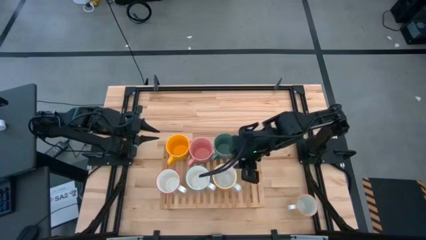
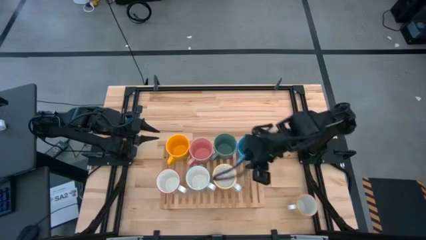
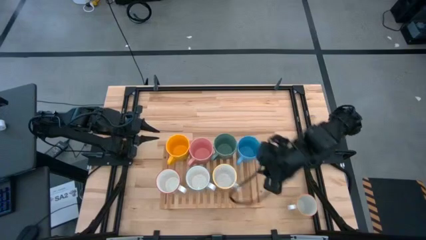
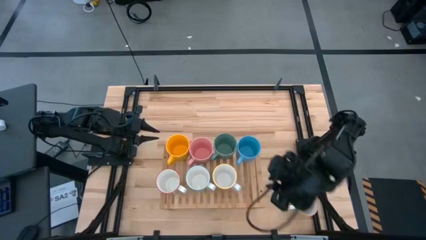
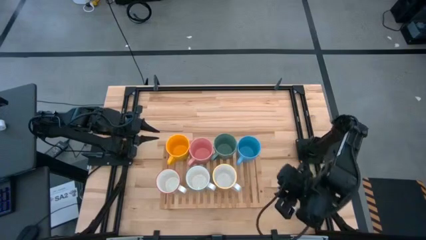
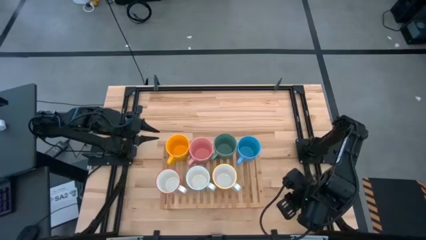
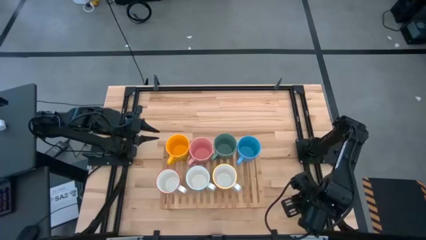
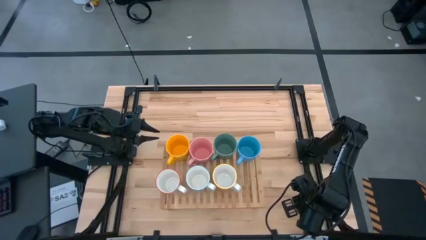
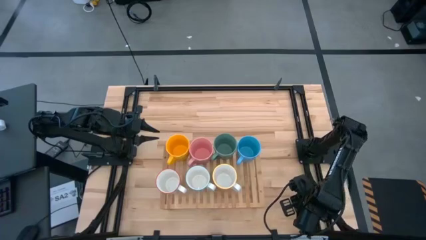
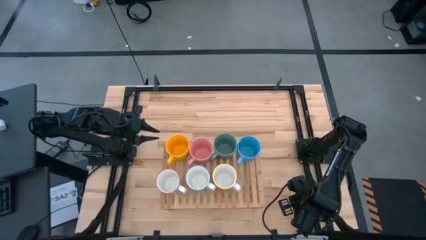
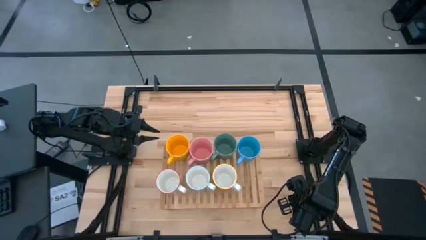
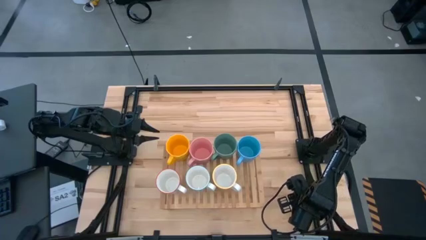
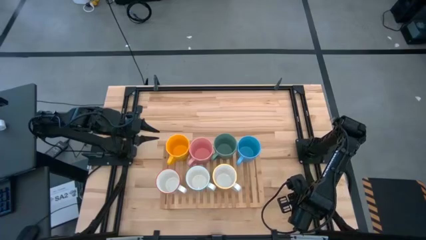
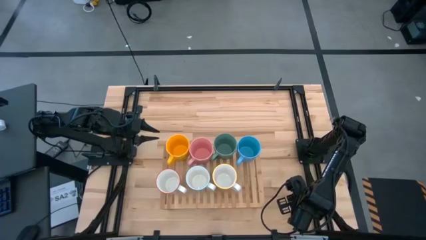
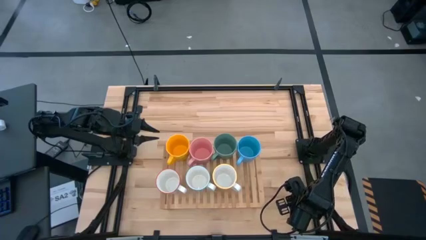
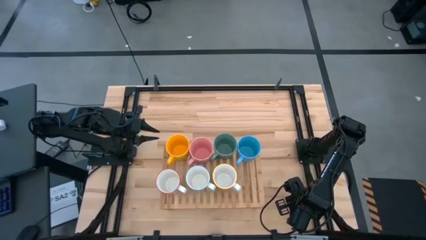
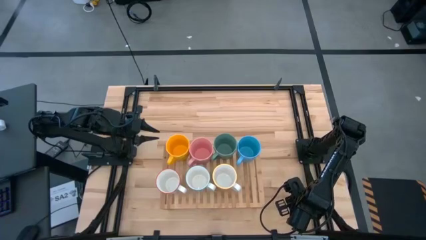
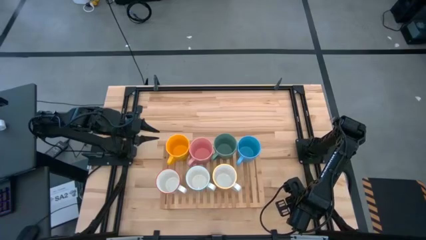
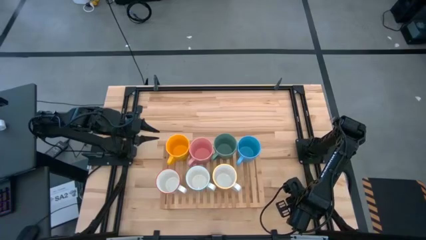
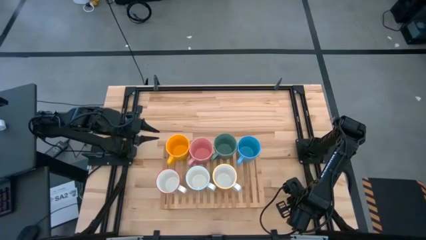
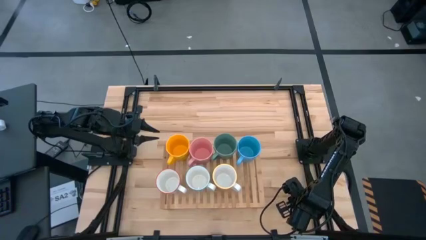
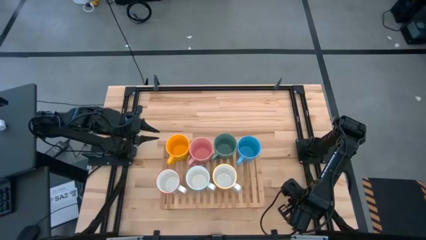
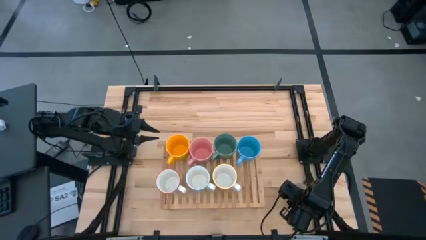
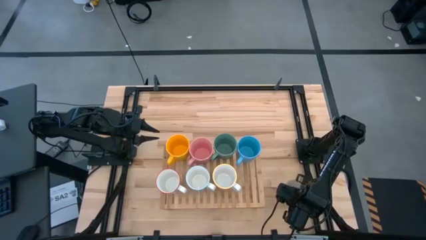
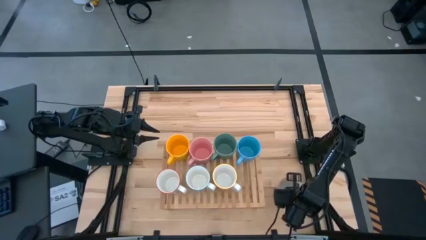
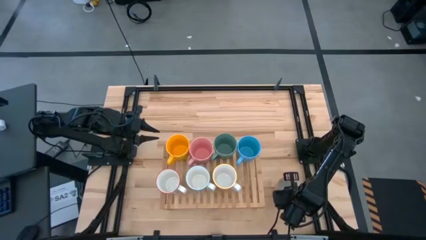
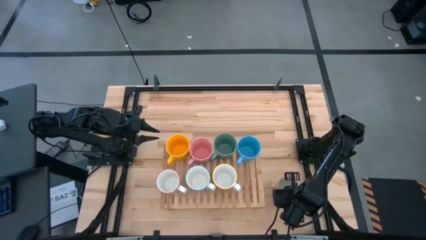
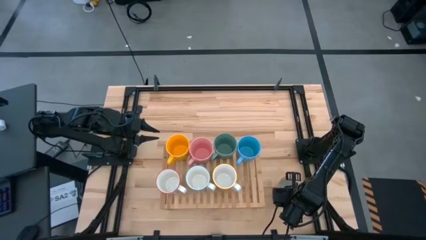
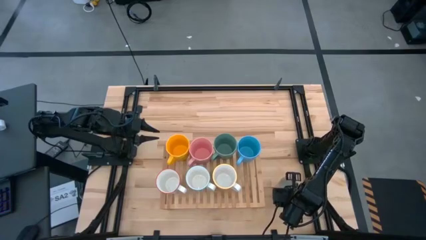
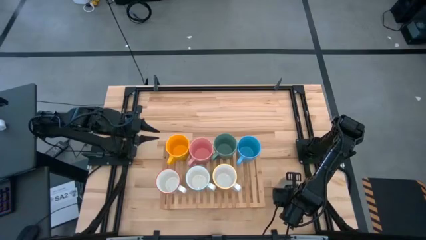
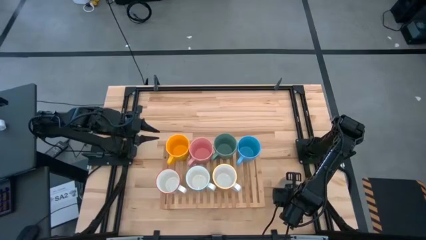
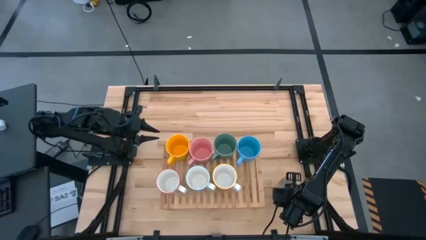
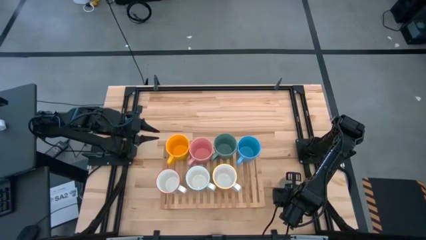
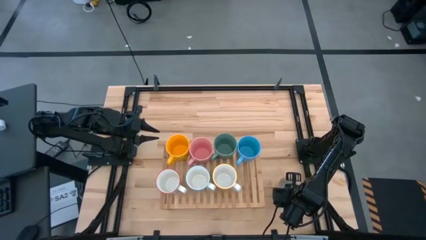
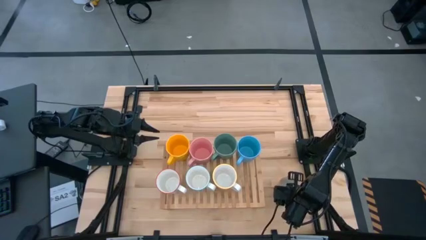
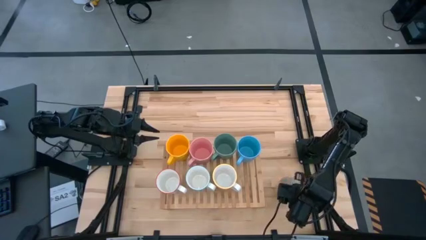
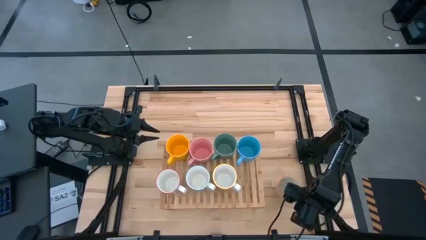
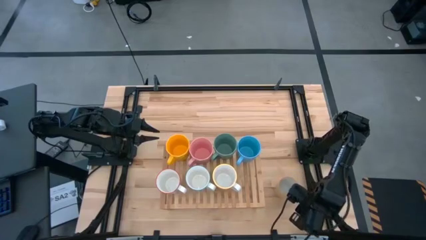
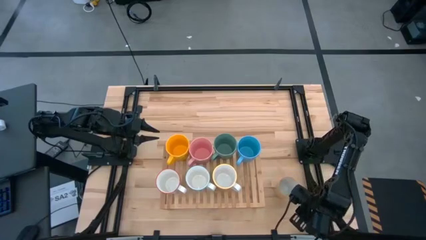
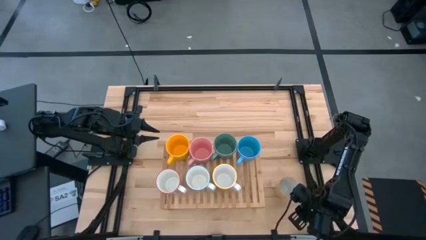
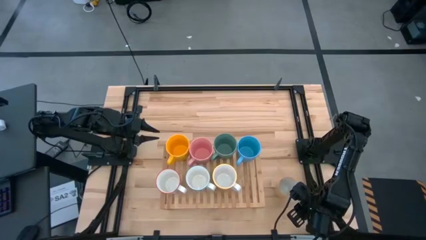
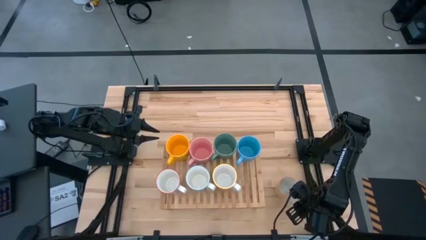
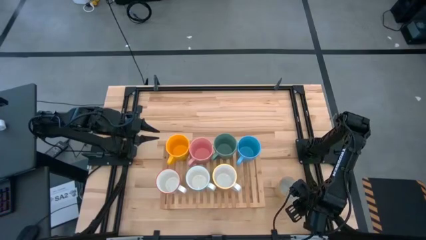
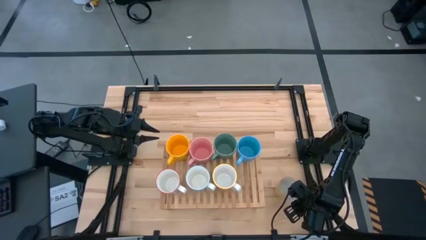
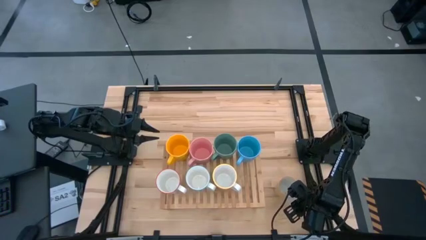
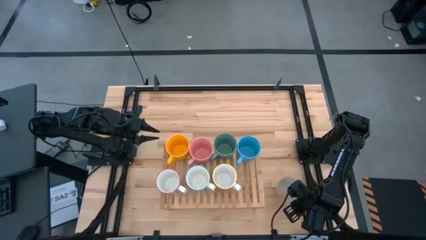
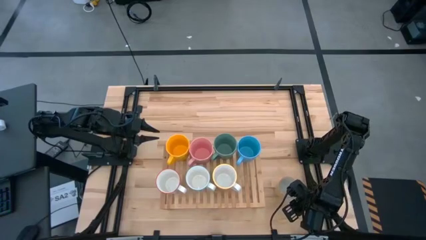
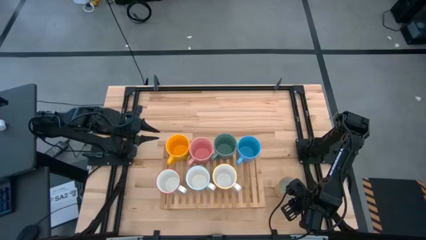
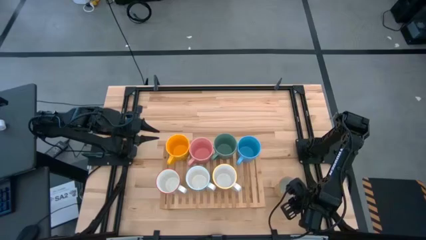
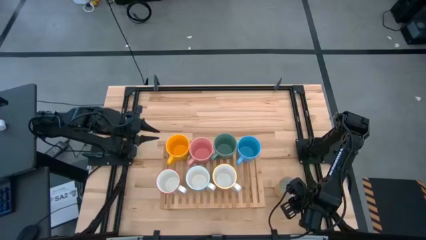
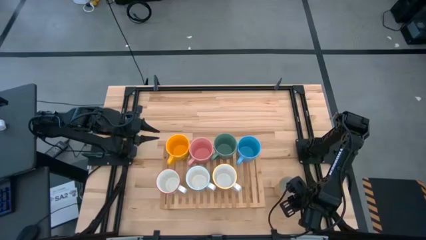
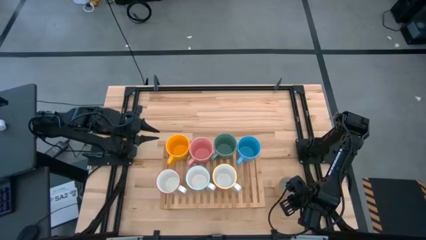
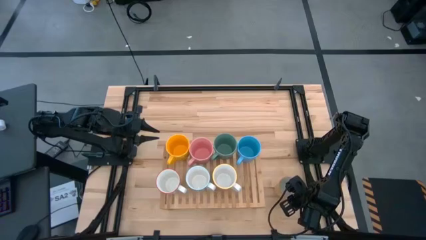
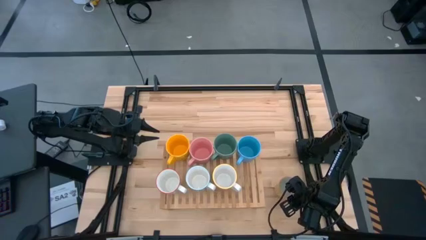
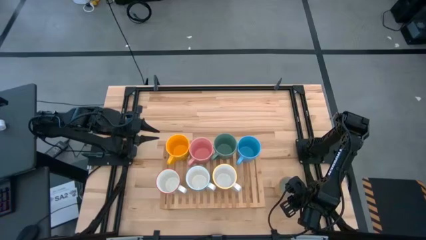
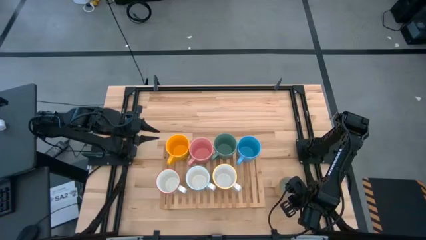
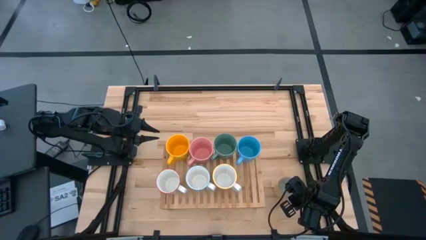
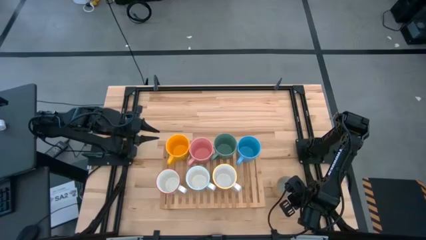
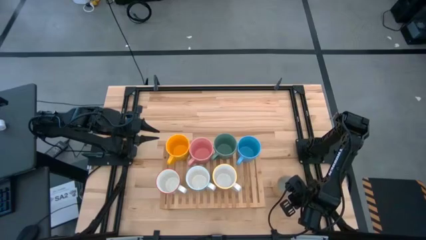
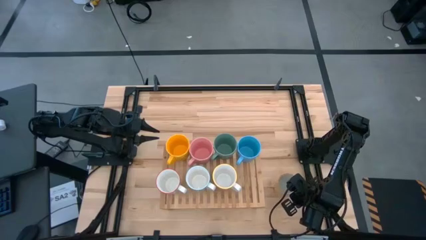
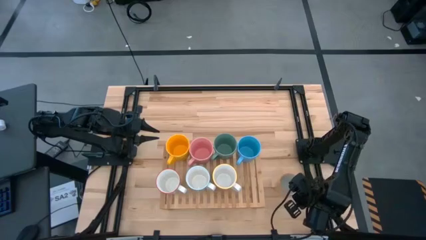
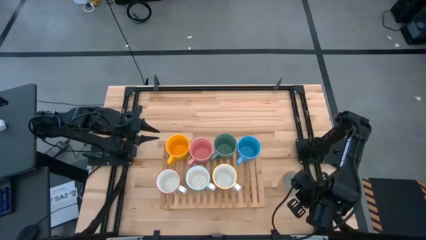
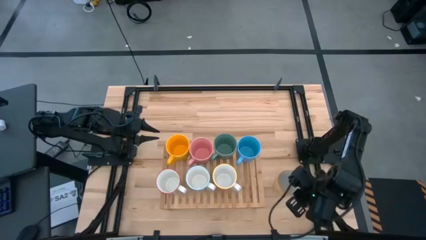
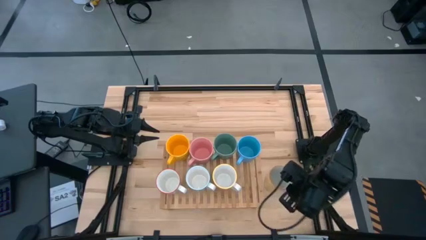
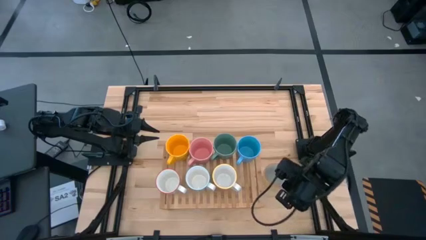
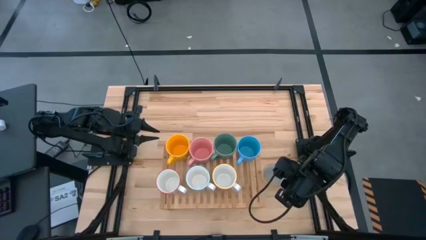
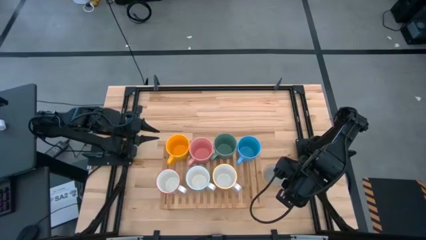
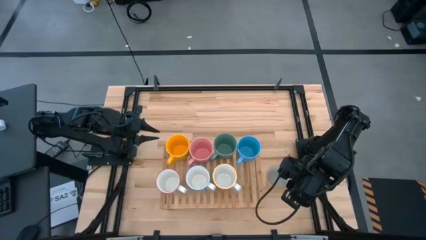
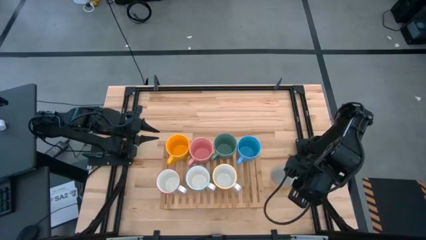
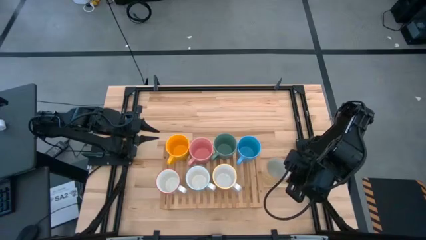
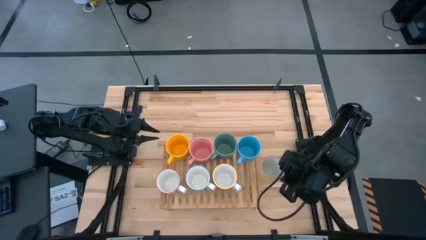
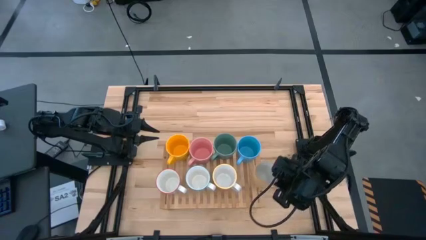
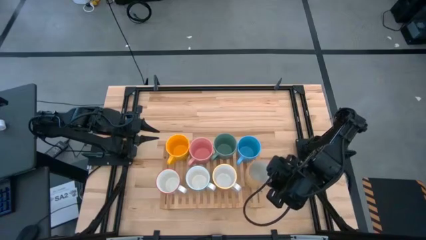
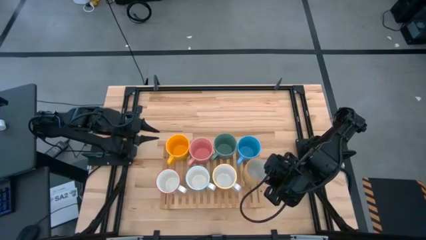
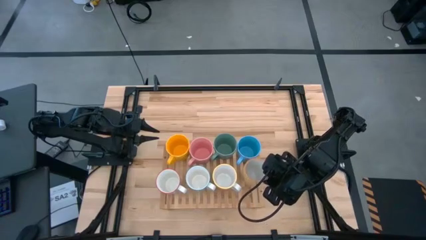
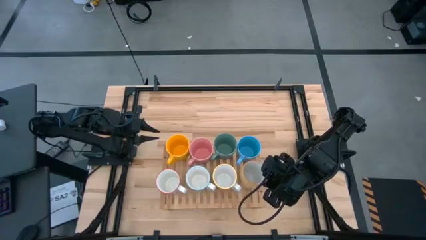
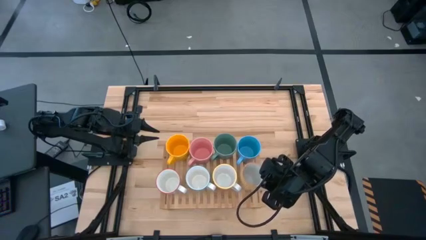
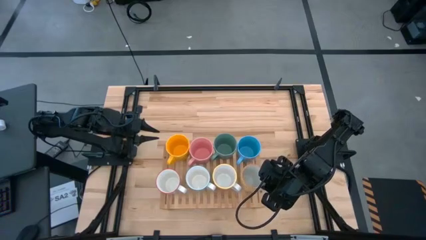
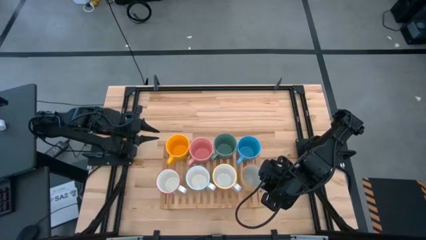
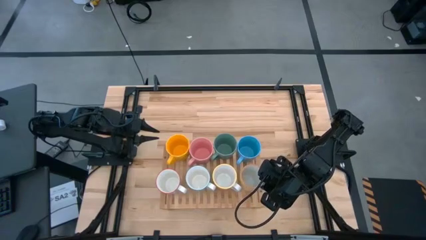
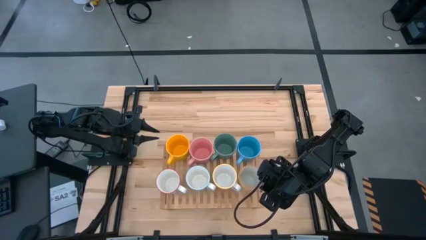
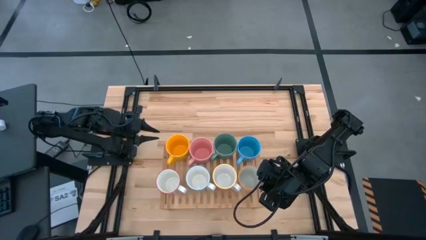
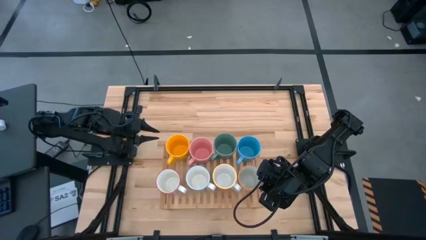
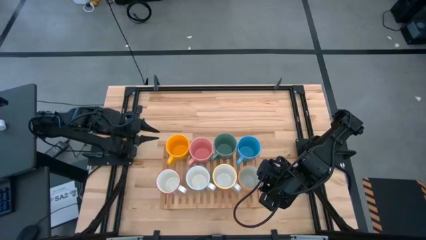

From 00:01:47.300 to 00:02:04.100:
Task: Place coffee mugs
Put the orange patterned mug on the shelf
